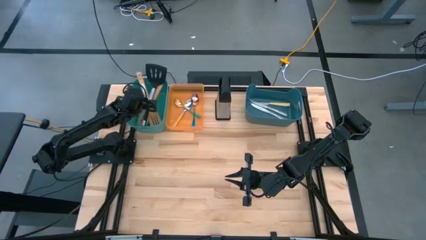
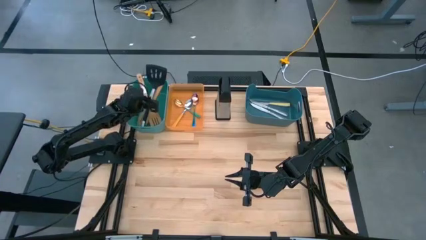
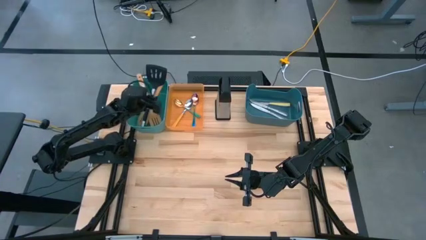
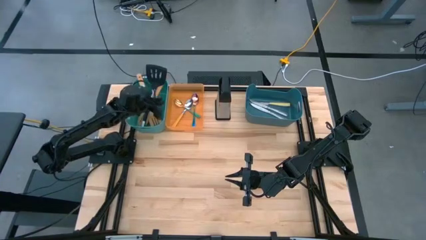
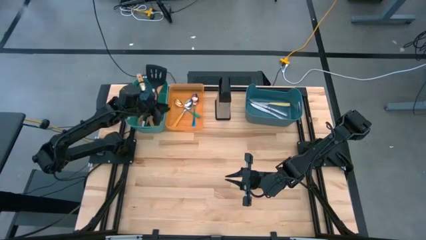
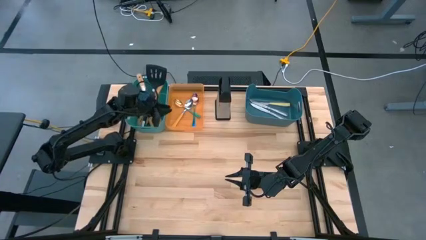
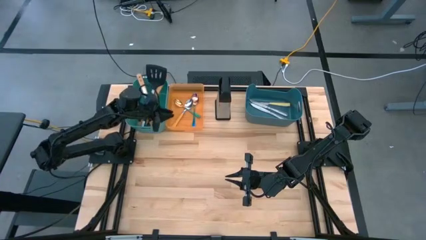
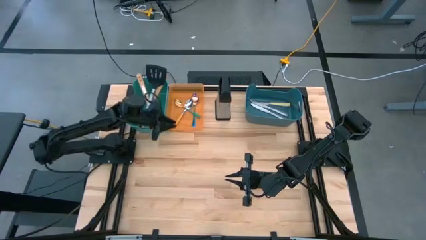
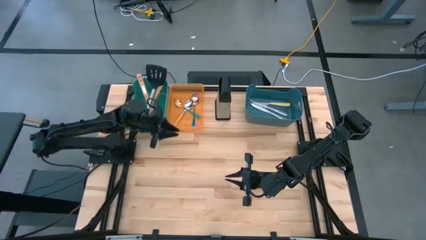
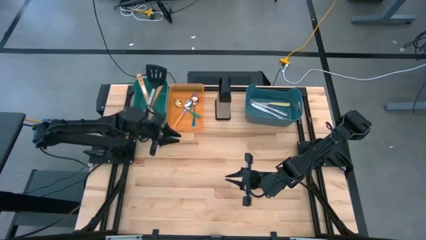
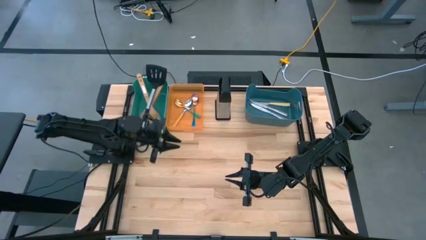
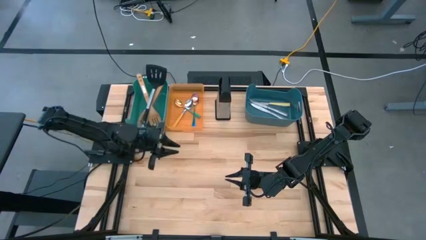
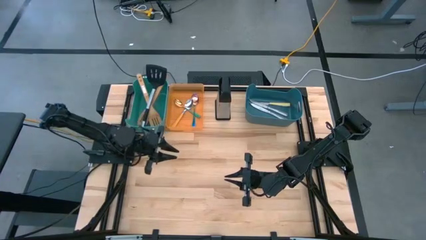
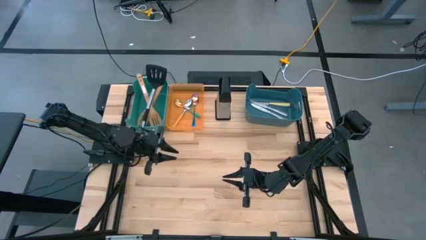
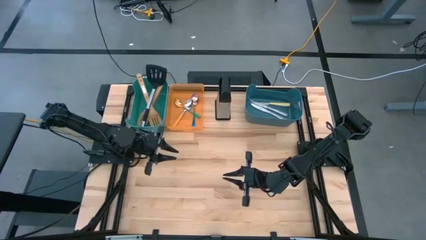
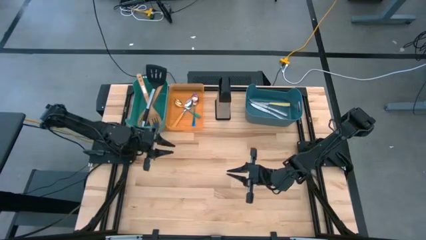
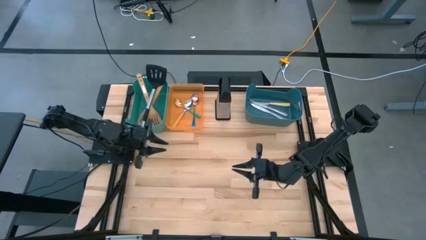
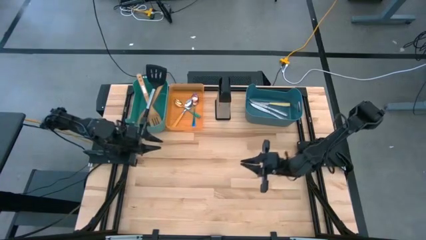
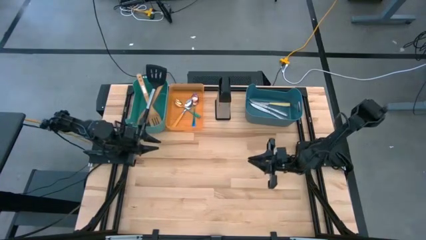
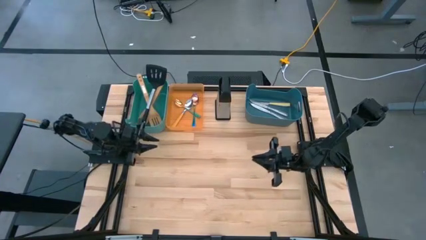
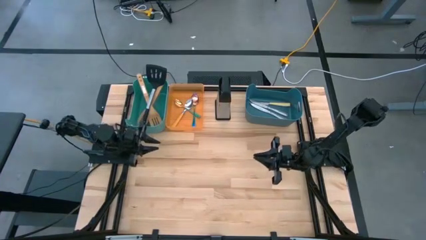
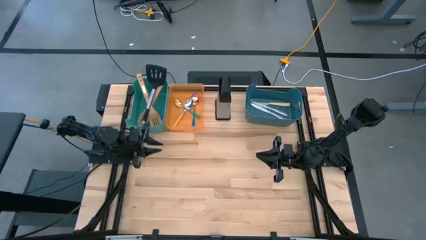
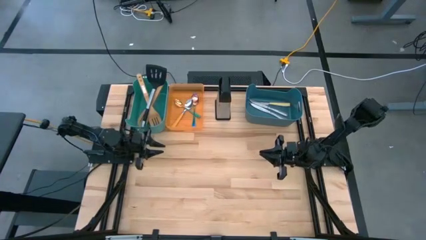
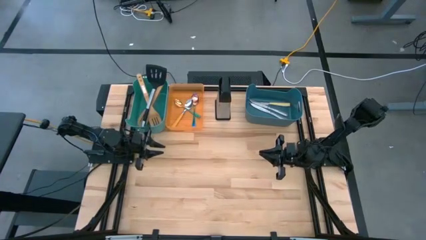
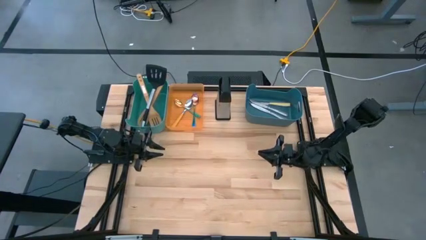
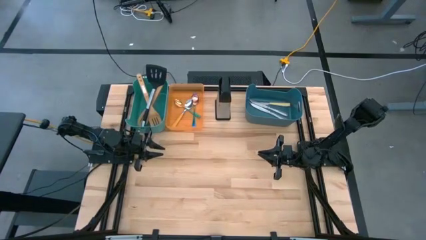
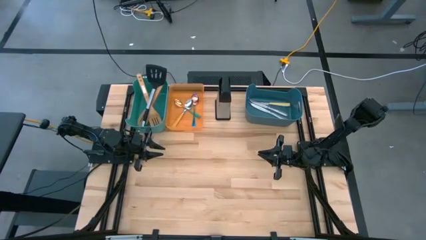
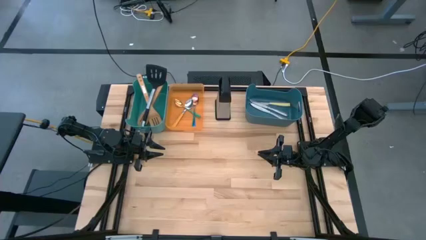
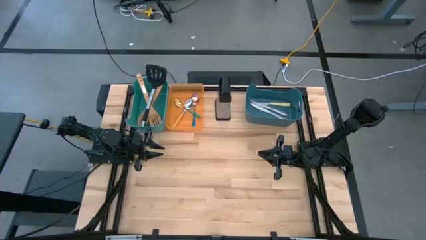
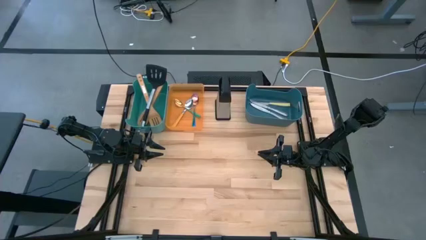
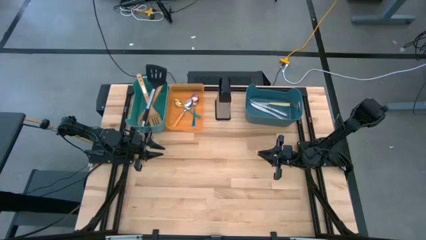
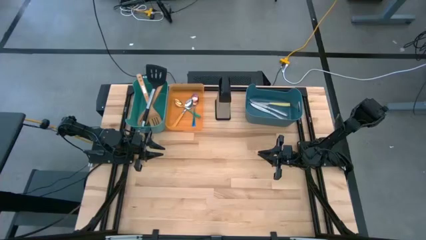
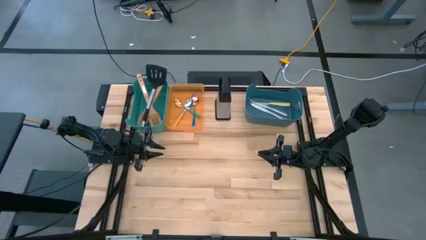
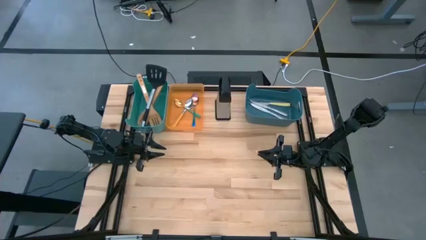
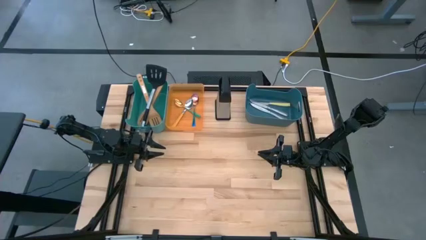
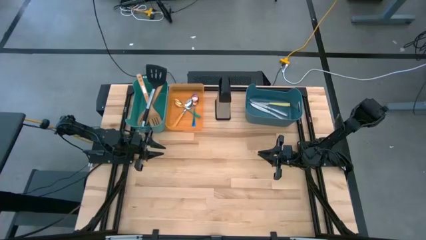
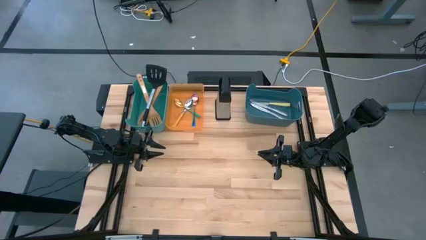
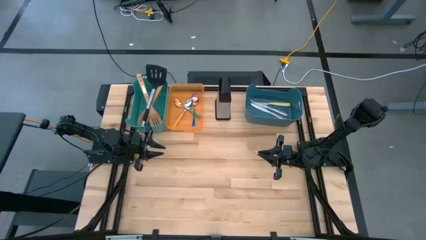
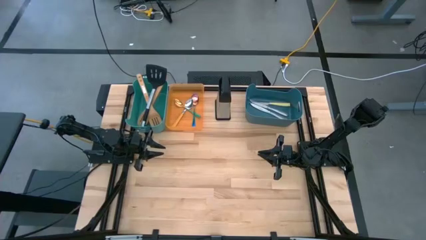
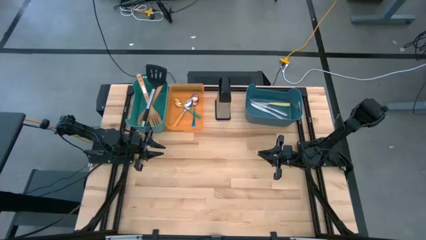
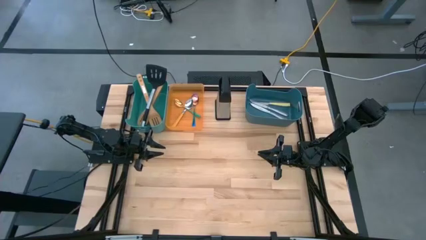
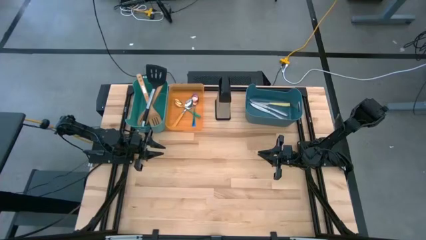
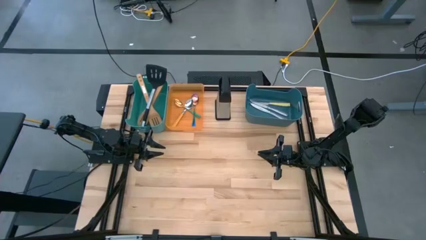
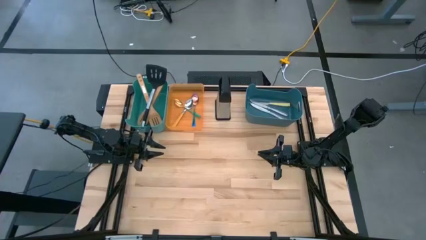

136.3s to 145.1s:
Task: Pick & Place Kitchen Items
Return to Home Position

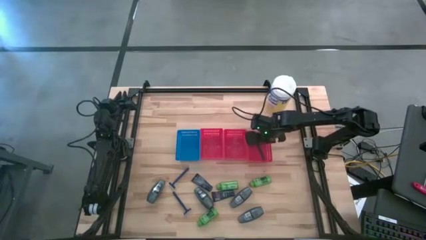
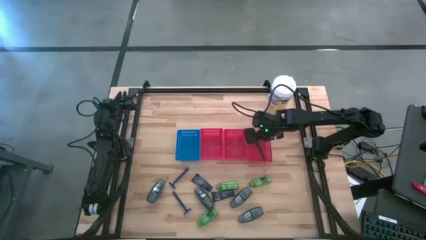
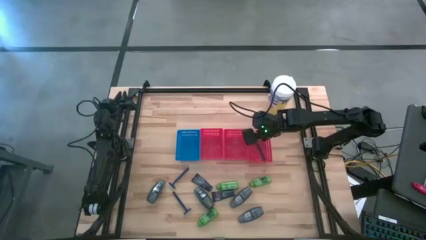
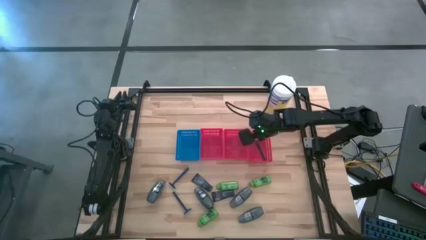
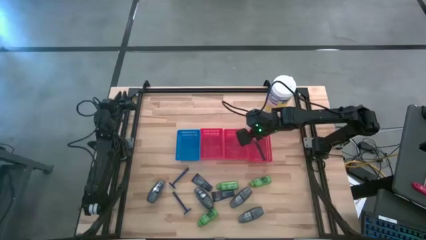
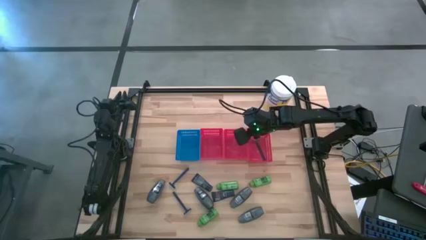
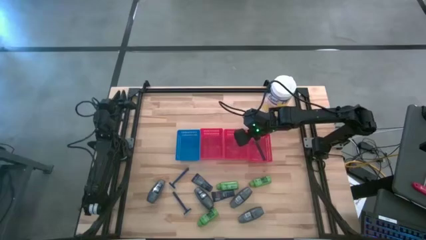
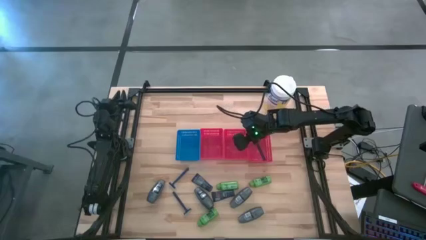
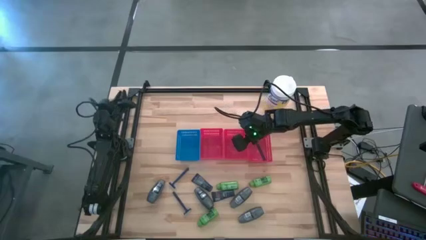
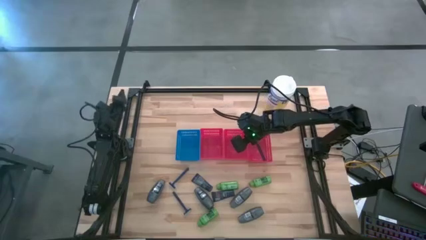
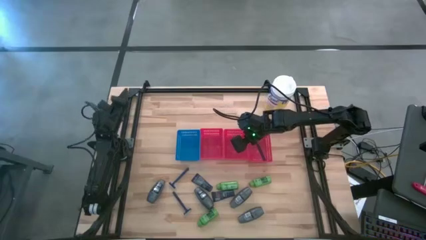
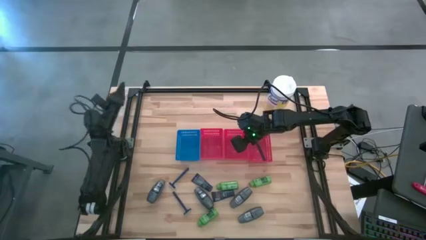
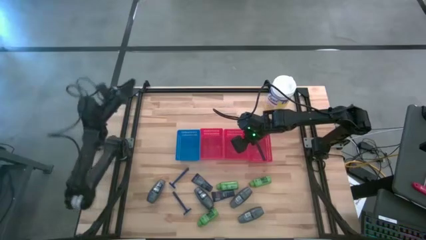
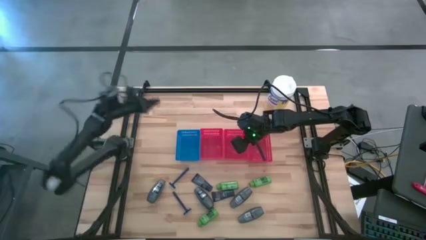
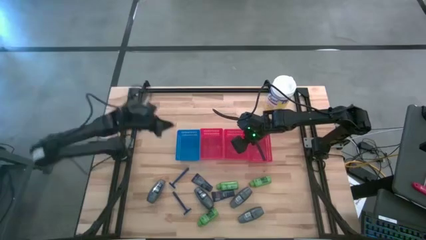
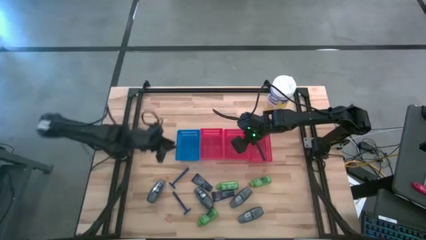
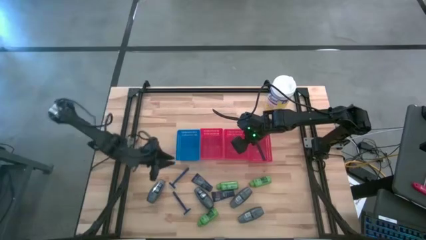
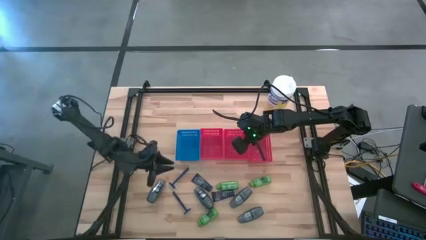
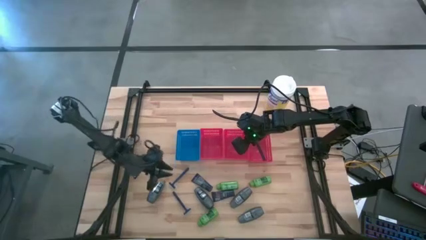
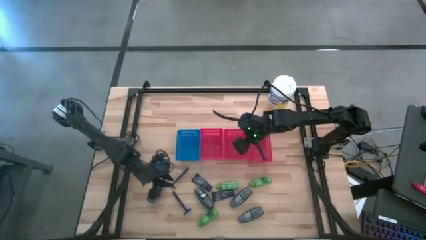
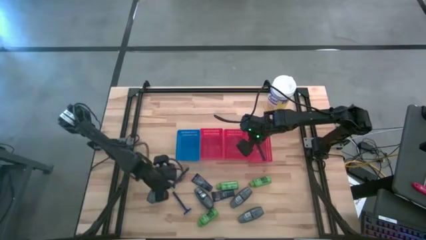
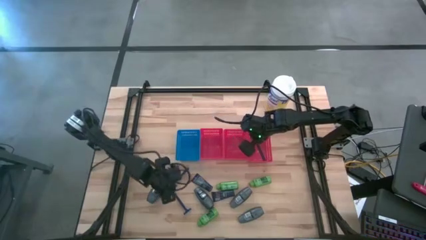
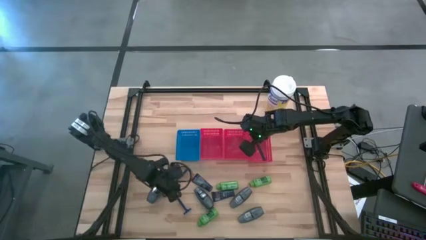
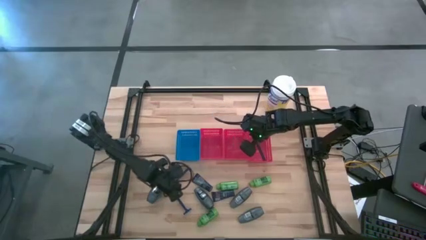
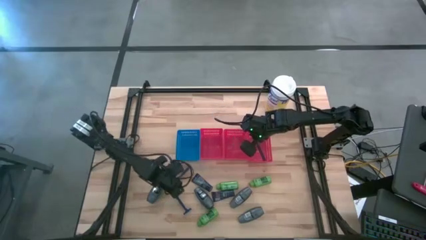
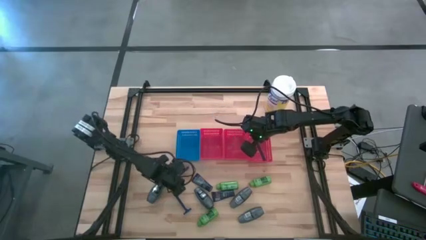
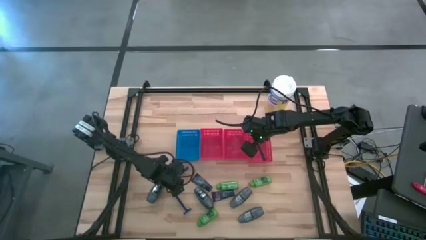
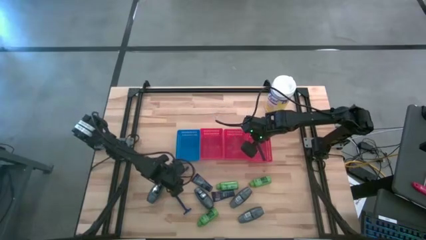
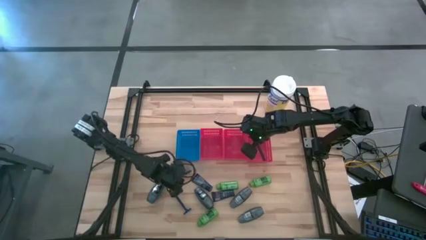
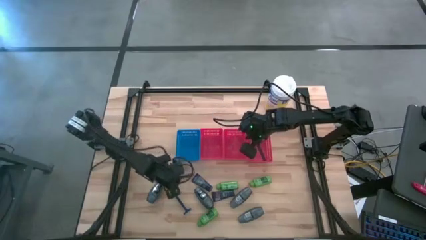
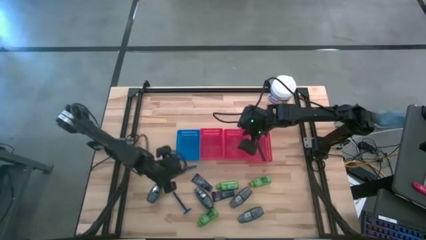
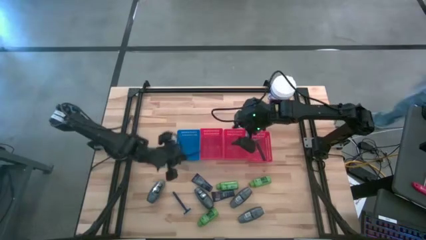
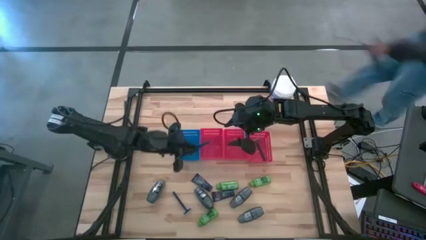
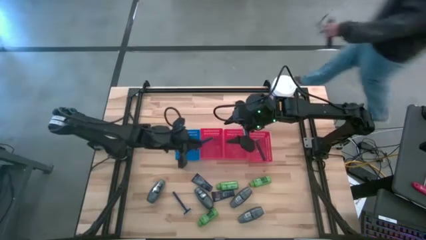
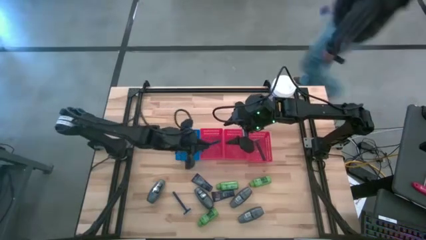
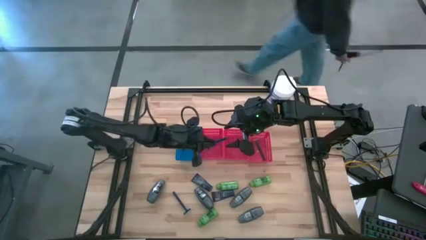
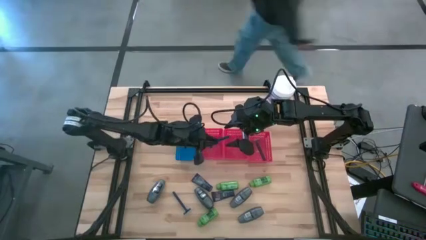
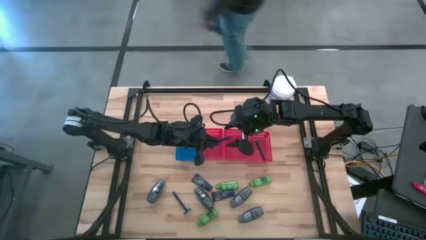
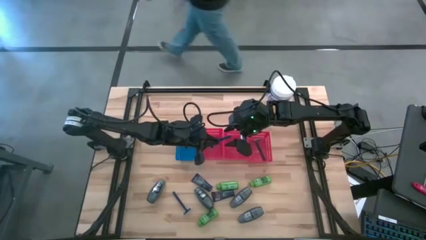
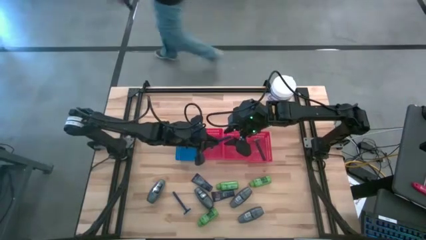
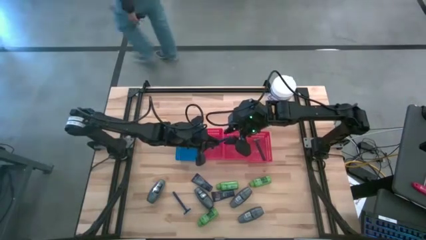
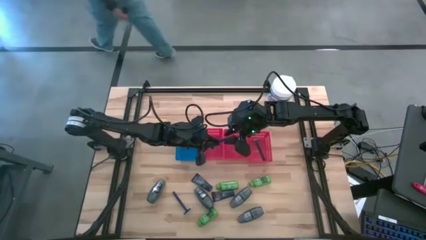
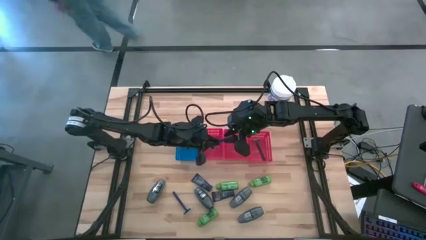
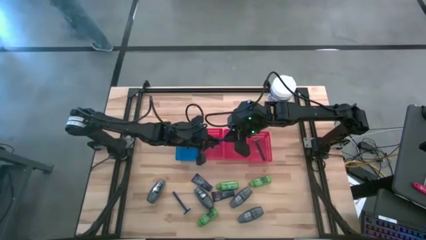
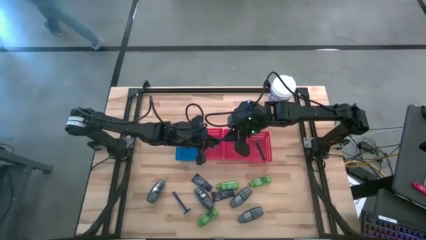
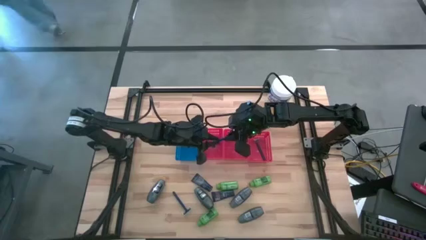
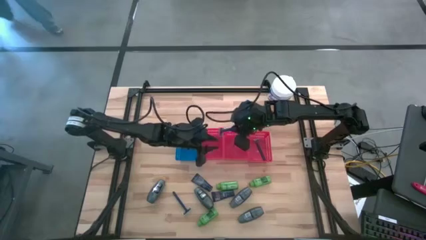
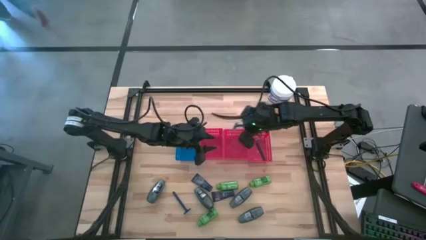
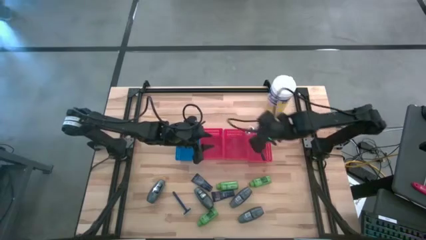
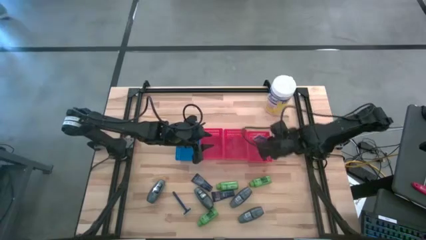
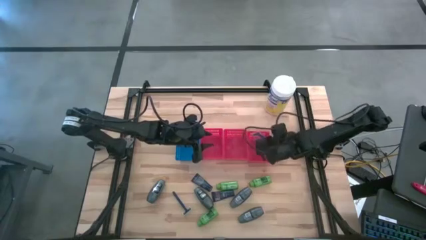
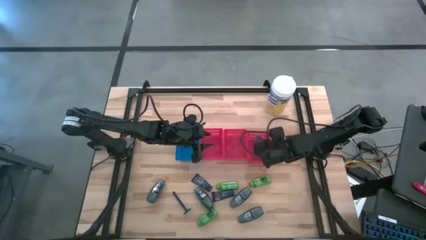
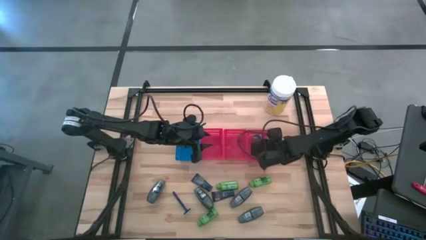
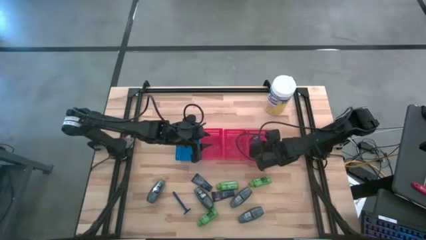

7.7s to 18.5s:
Task: Pick & Place Travel size toiletries
Put the blue razor into the right red bin
